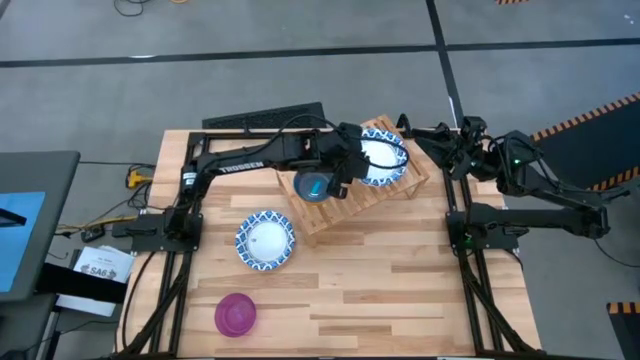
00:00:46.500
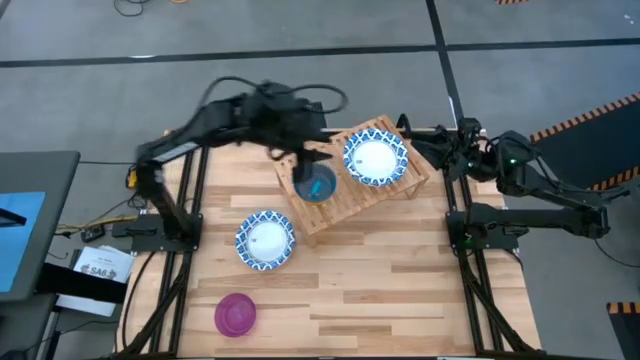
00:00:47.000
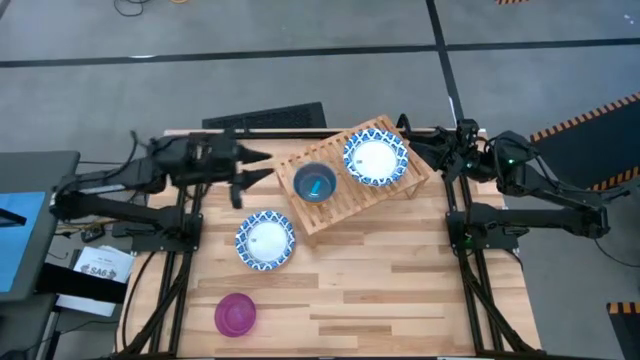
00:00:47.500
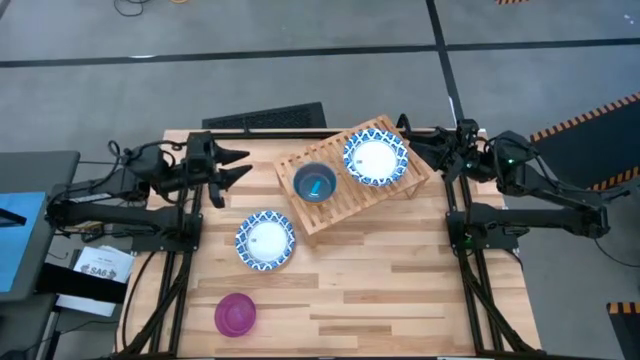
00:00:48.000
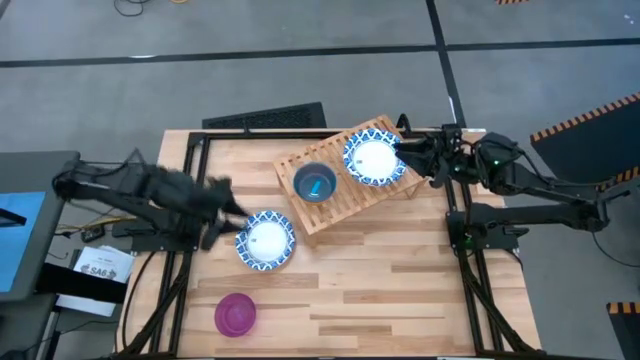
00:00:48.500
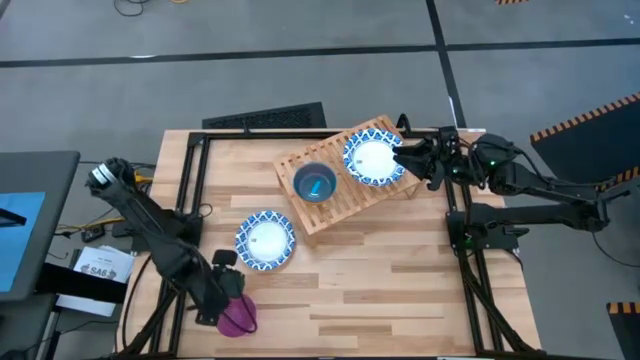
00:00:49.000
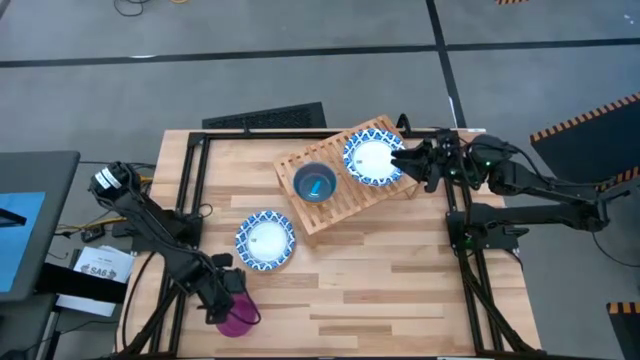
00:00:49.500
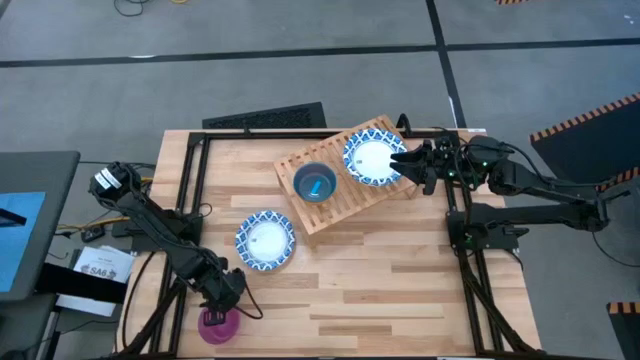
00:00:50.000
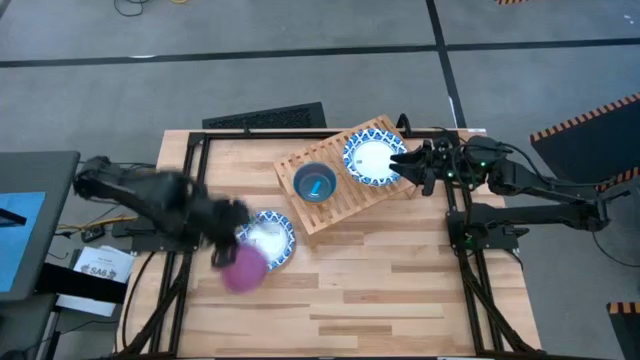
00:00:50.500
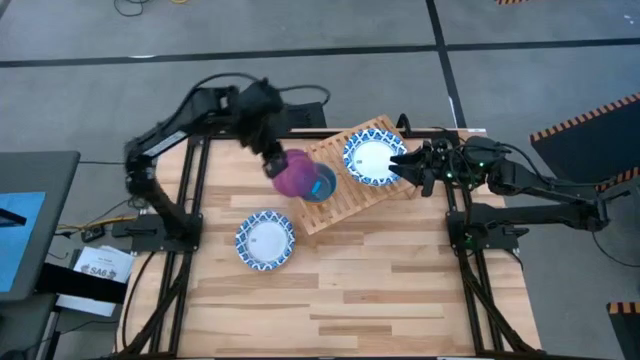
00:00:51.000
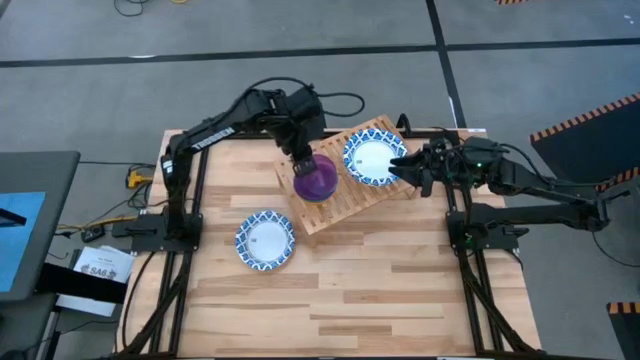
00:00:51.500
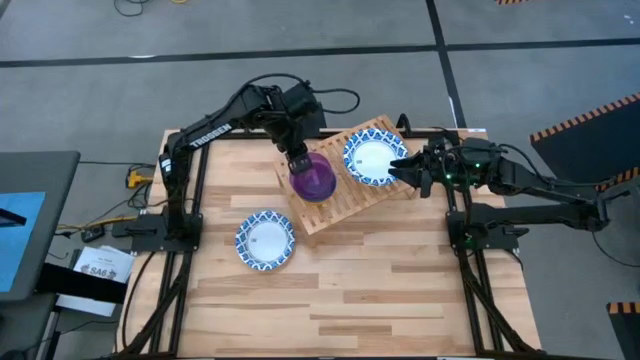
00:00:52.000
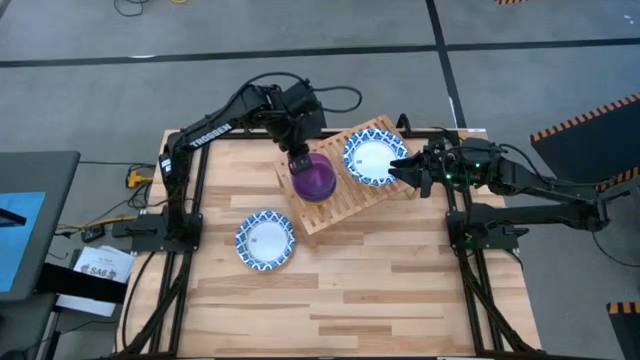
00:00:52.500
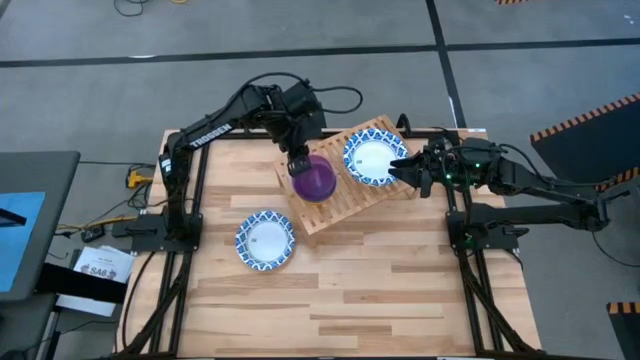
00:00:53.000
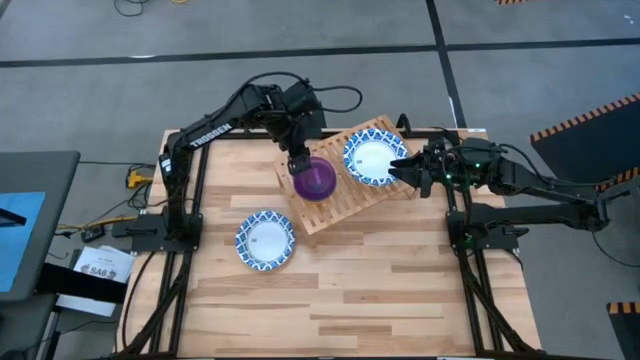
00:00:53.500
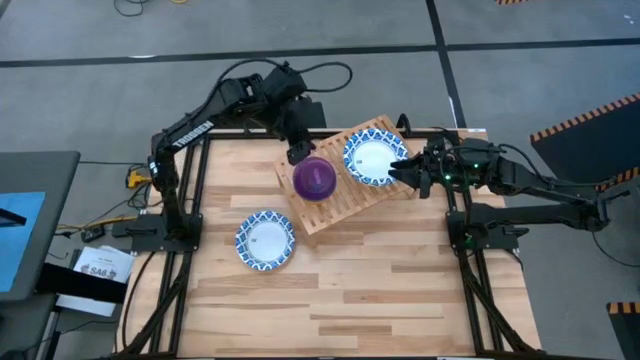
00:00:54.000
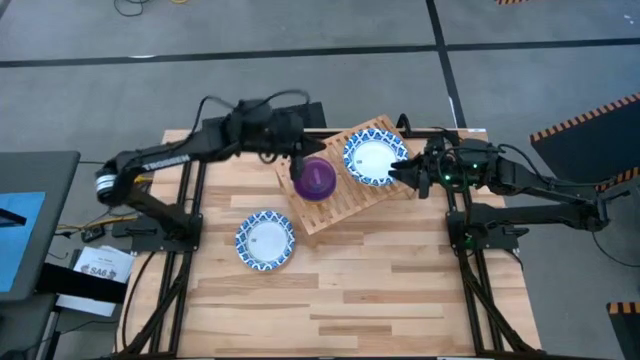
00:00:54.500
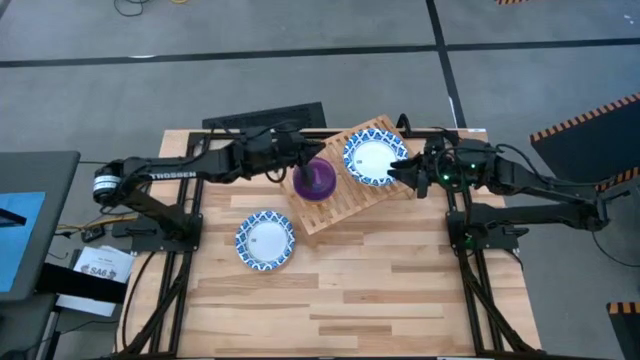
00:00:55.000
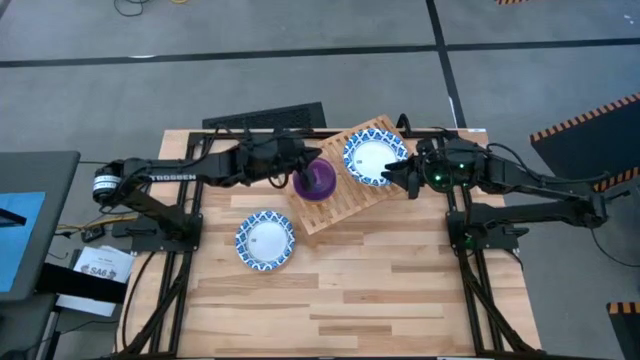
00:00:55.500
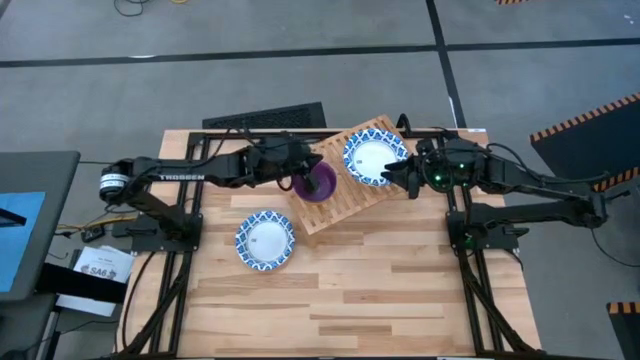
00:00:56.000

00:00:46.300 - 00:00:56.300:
Task: Place and stack bowls onto a shelf
Stack the purple bowl on top of the blue bowl on the shelf

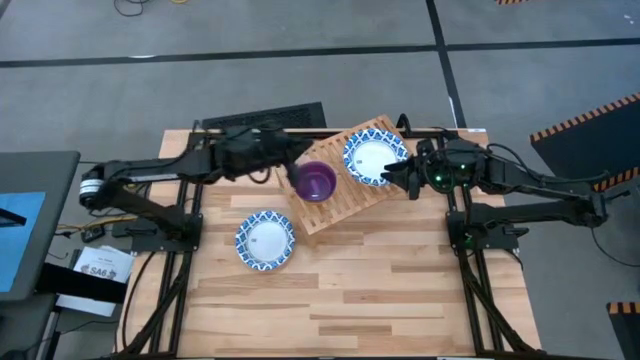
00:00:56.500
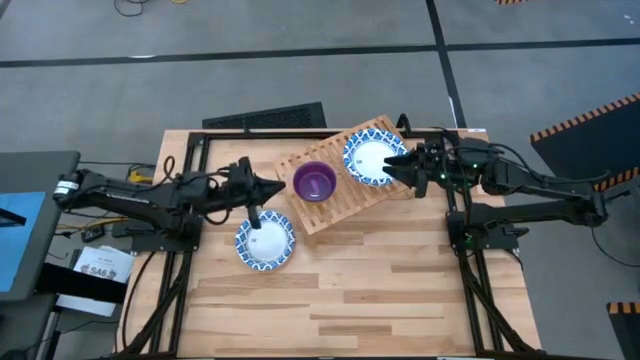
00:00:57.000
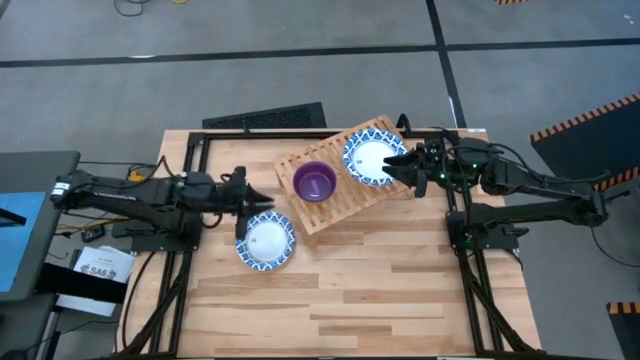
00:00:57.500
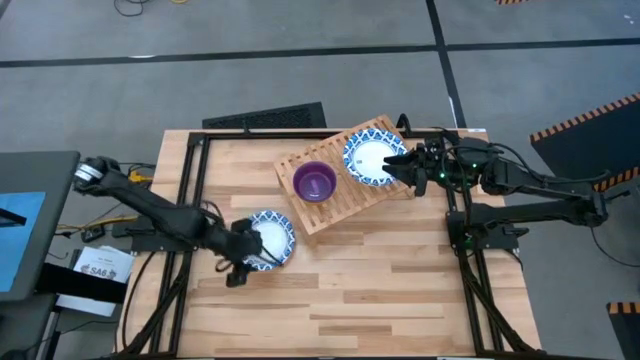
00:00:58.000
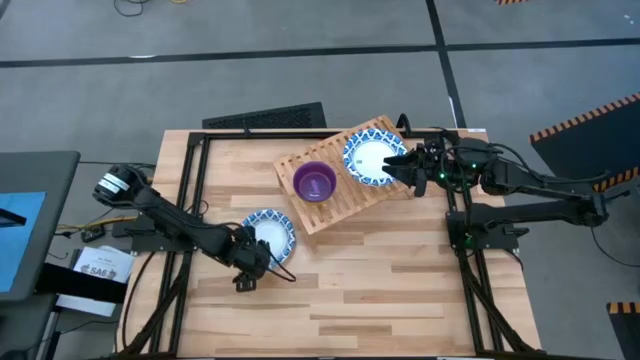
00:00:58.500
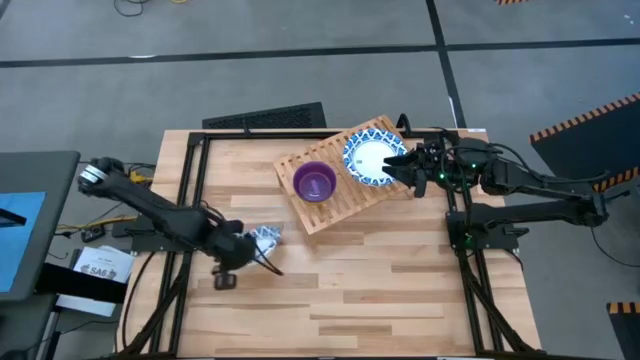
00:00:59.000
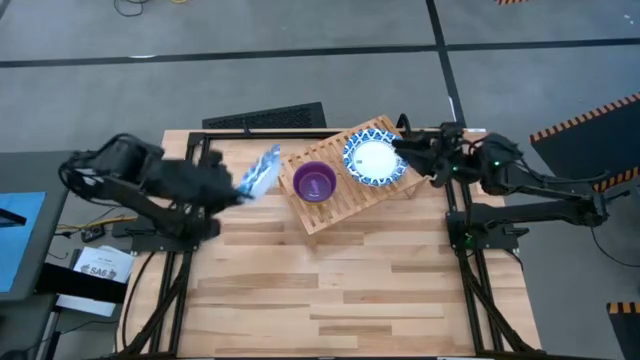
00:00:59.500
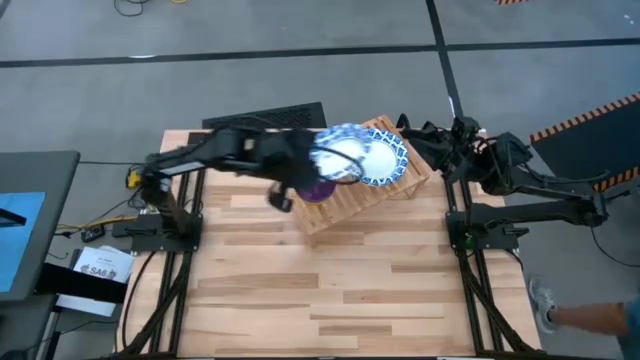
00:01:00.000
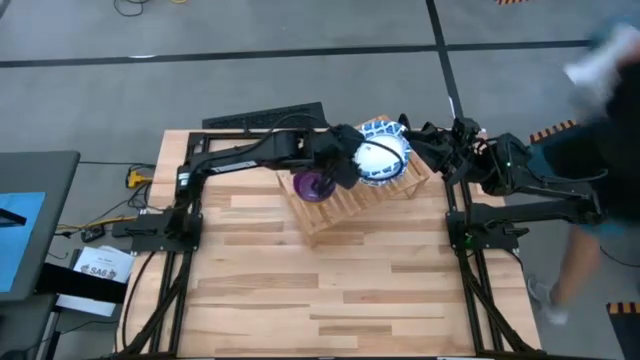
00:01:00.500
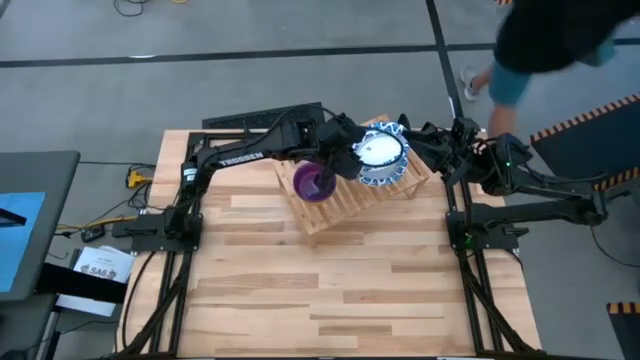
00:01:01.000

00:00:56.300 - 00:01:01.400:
Stack the white patterned bowl on top of the white patterned bowl on the shelf

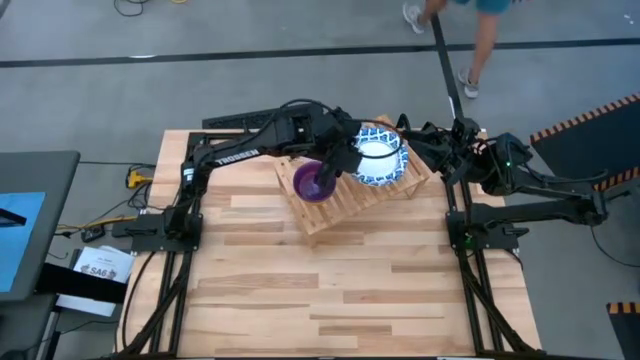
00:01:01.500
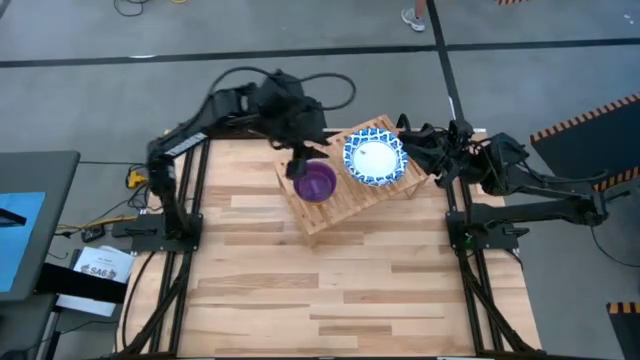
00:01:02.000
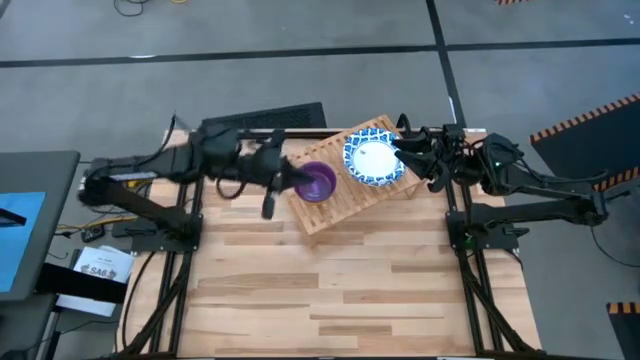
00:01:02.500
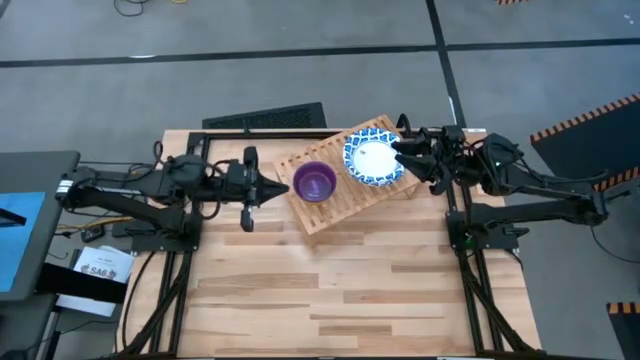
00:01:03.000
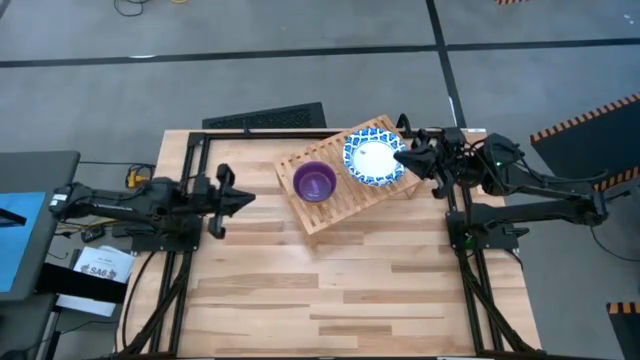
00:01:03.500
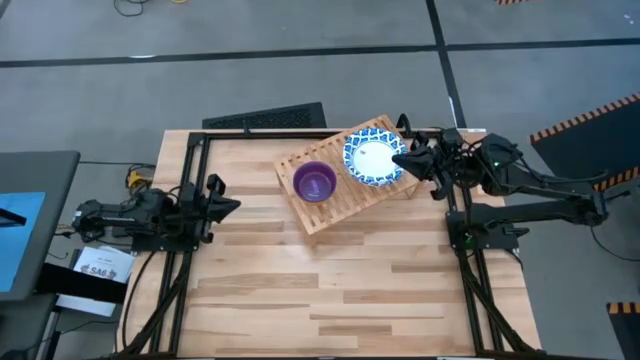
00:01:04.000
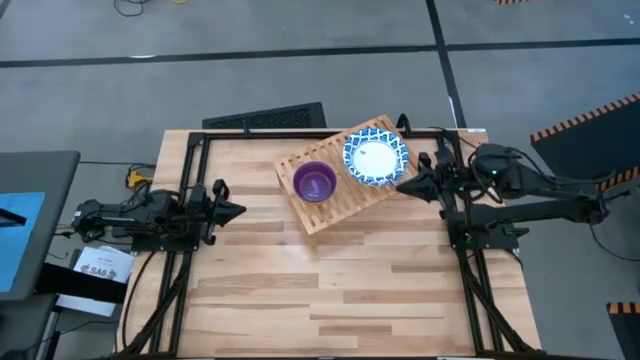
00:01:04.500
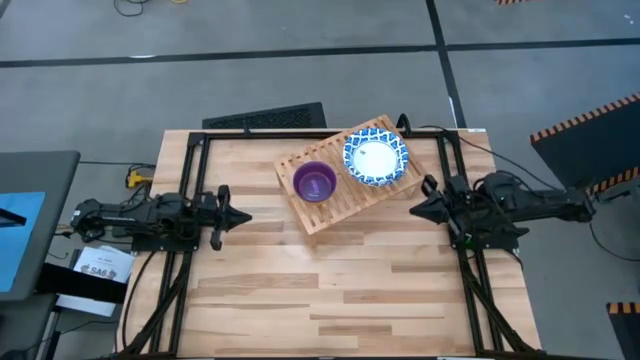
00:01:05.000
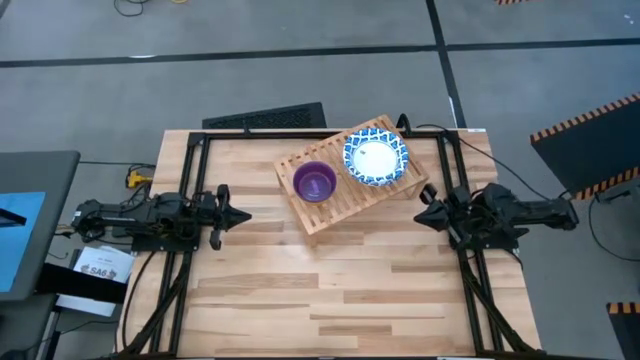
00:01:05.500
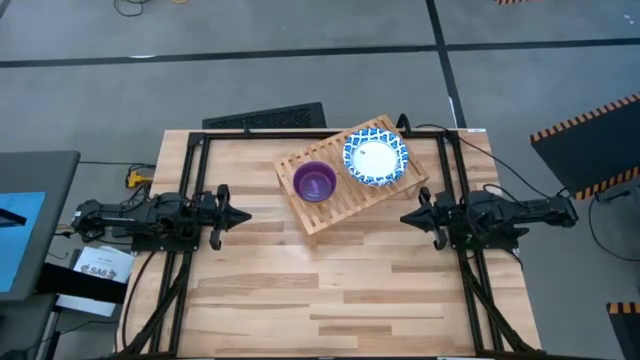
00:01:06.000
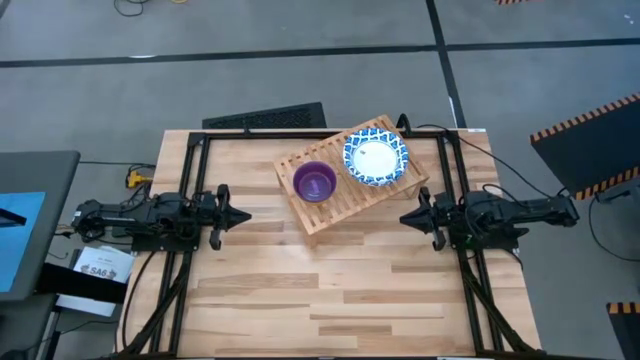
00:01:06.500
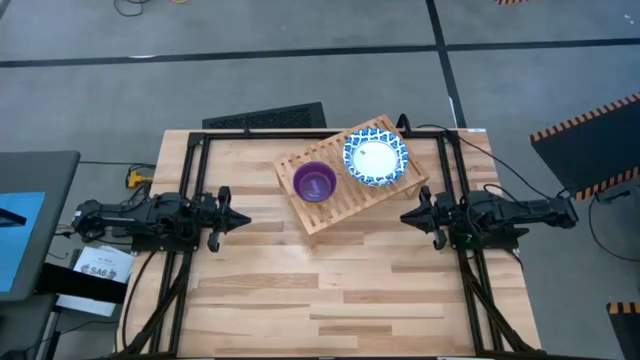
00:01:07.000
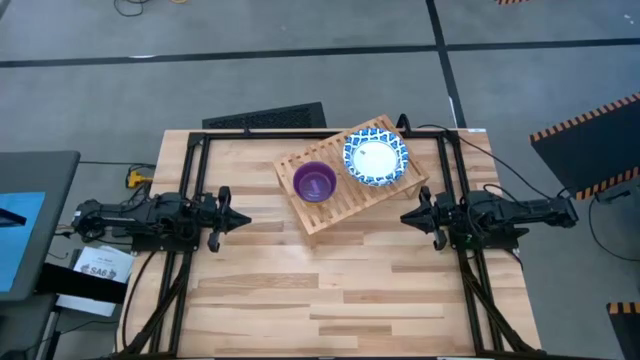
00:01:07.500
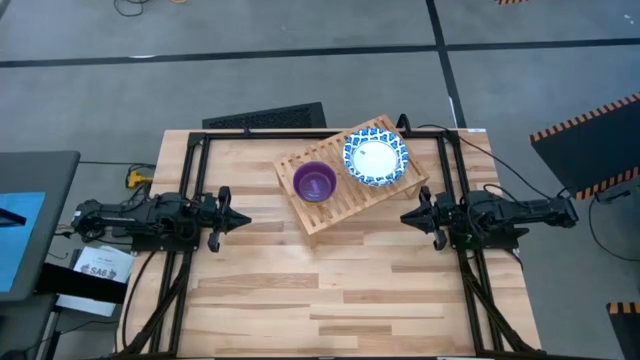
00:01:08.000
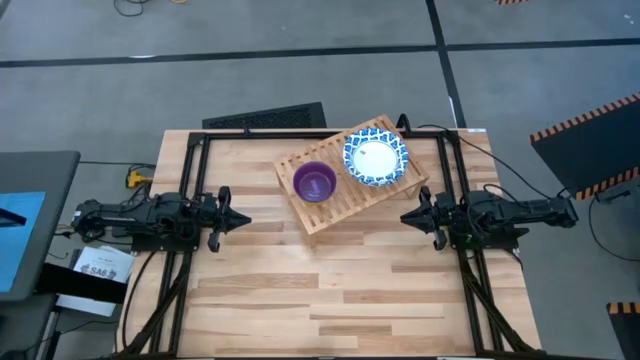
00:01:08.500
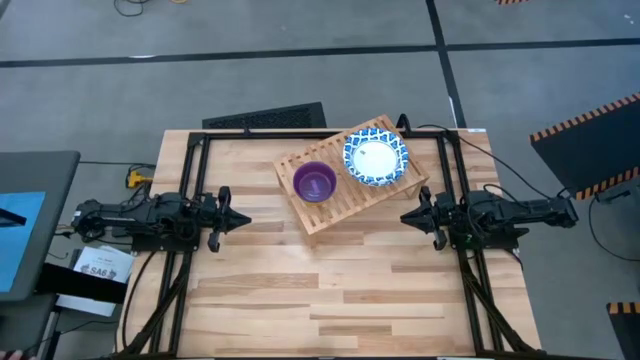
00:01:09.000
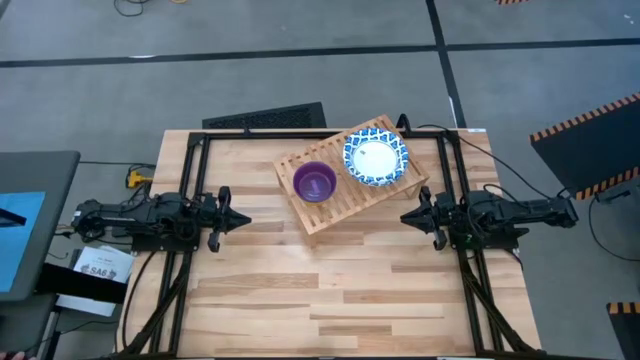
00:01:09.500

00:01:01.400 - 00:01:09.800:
Return to Home Position
